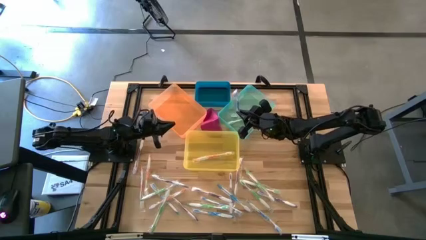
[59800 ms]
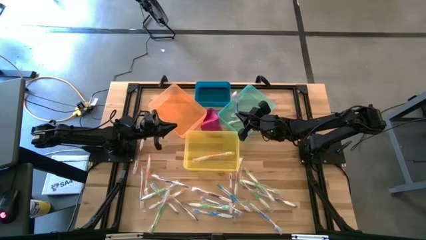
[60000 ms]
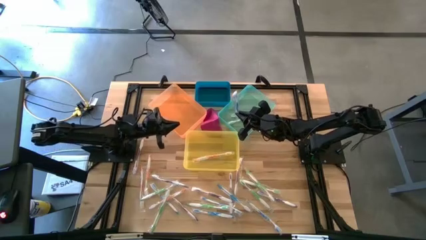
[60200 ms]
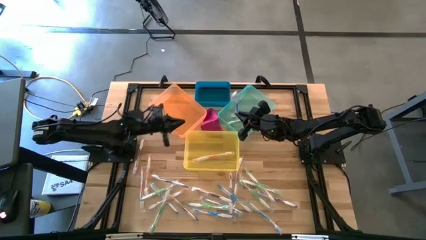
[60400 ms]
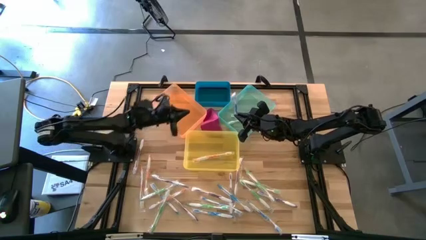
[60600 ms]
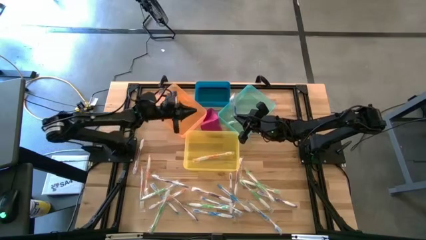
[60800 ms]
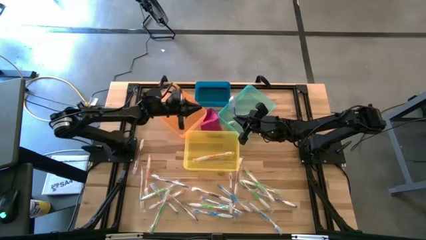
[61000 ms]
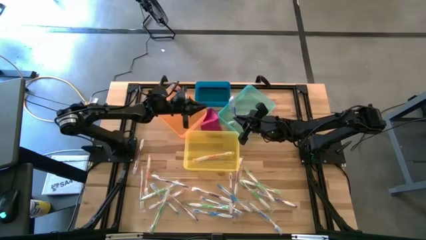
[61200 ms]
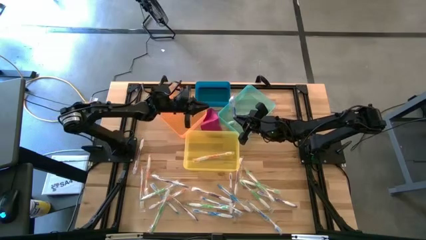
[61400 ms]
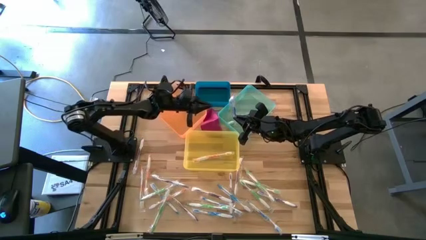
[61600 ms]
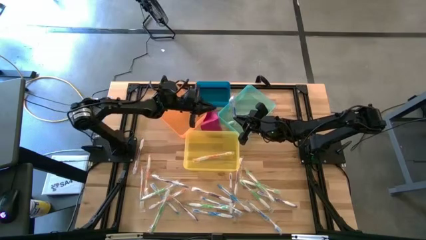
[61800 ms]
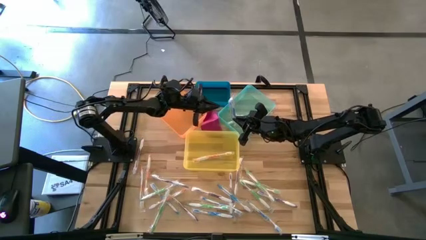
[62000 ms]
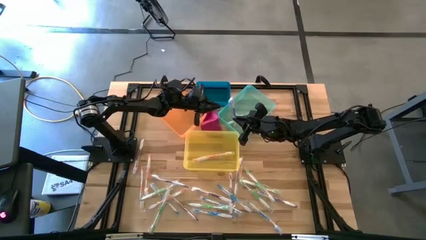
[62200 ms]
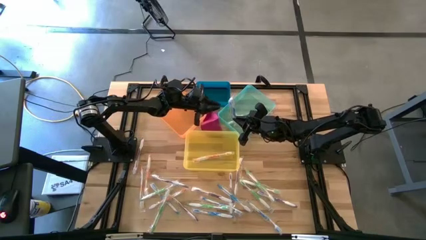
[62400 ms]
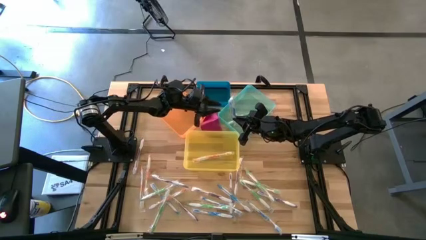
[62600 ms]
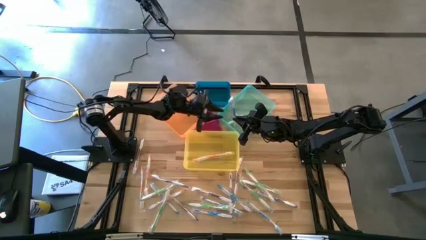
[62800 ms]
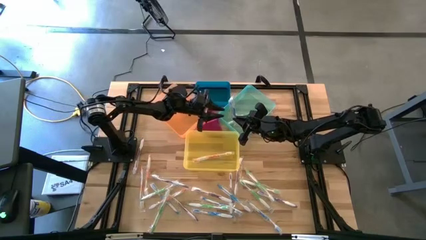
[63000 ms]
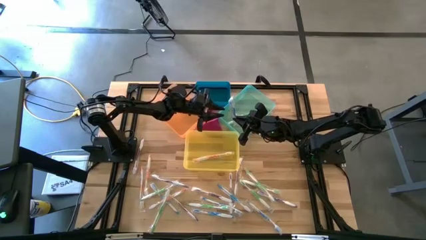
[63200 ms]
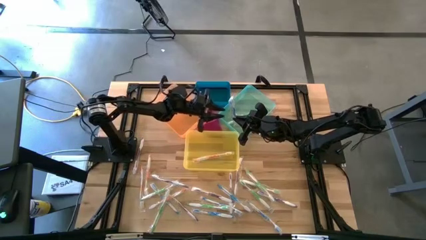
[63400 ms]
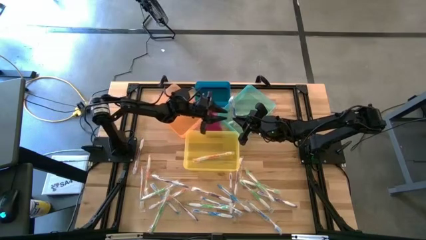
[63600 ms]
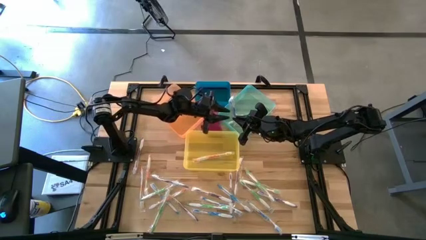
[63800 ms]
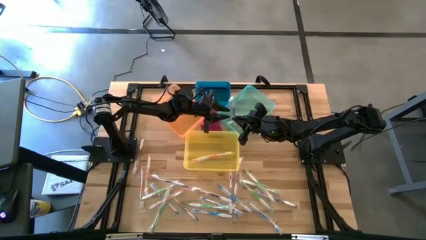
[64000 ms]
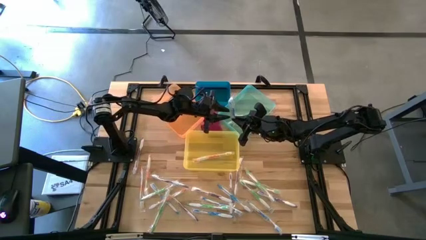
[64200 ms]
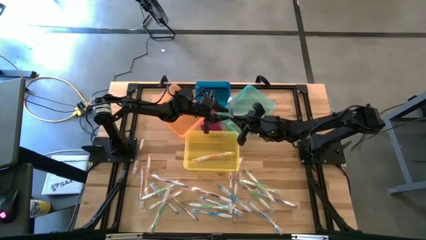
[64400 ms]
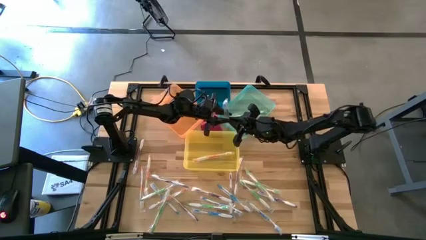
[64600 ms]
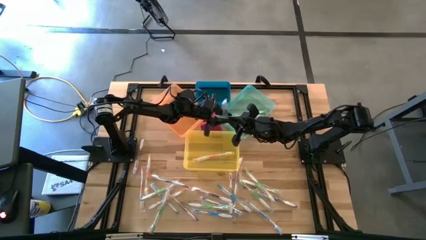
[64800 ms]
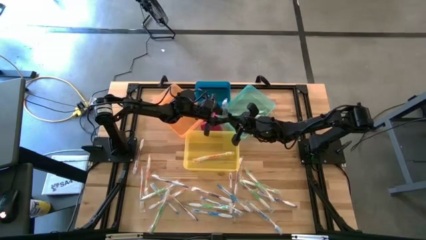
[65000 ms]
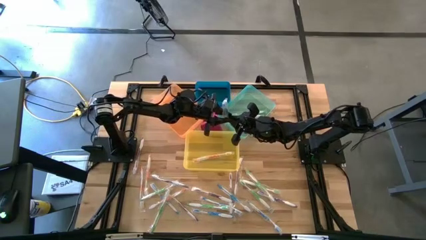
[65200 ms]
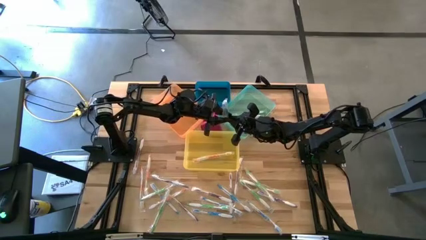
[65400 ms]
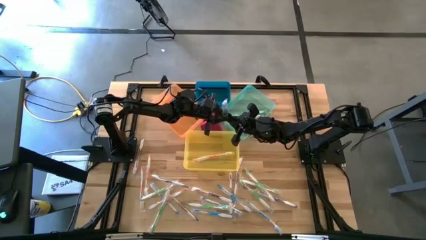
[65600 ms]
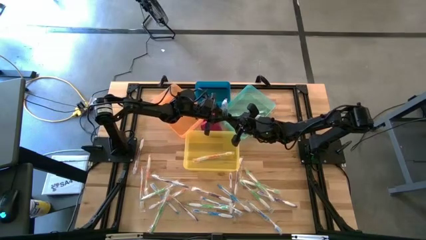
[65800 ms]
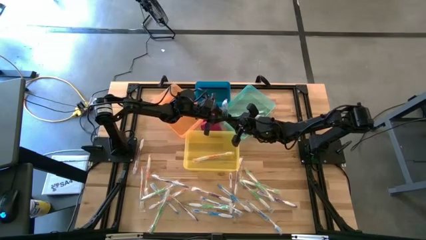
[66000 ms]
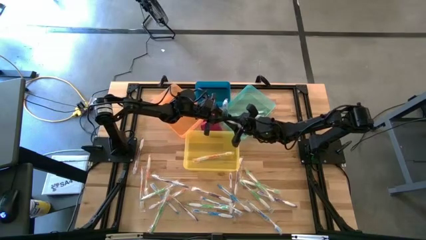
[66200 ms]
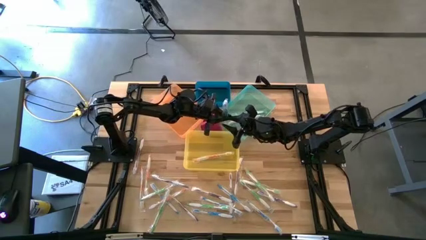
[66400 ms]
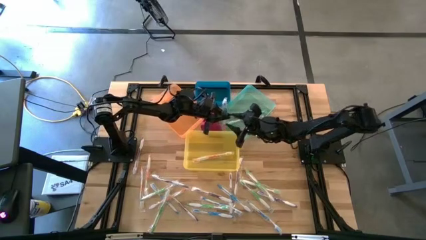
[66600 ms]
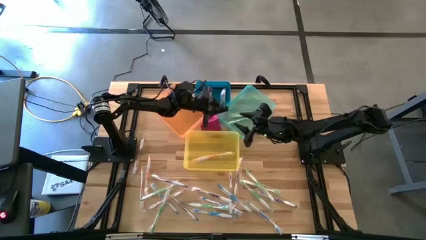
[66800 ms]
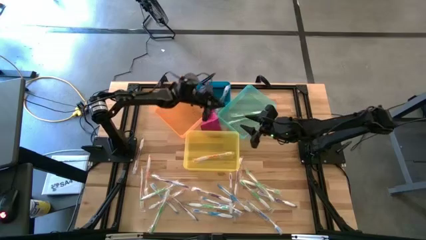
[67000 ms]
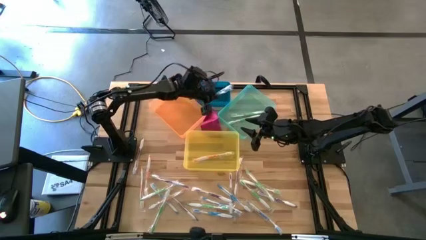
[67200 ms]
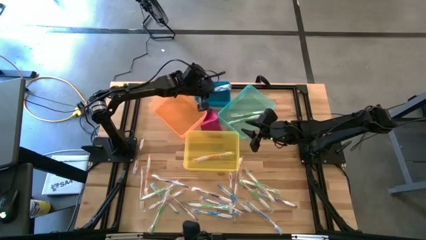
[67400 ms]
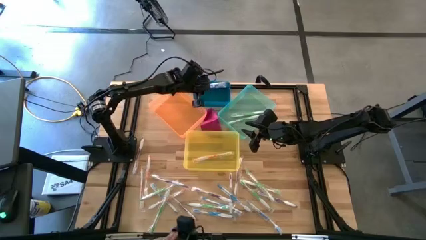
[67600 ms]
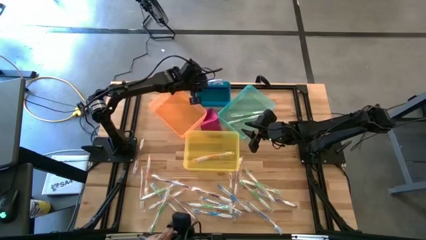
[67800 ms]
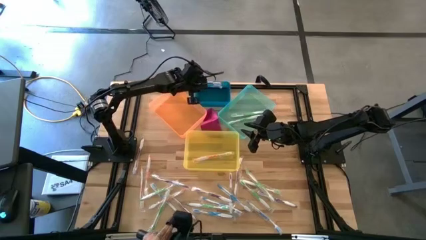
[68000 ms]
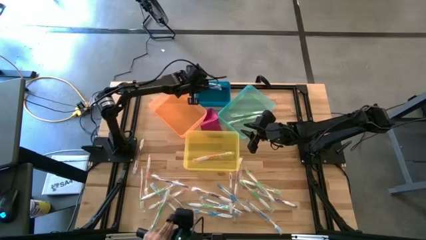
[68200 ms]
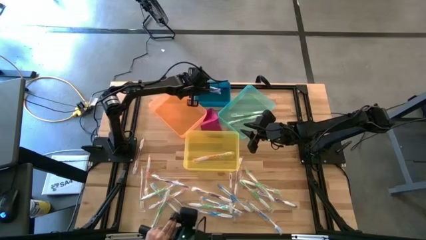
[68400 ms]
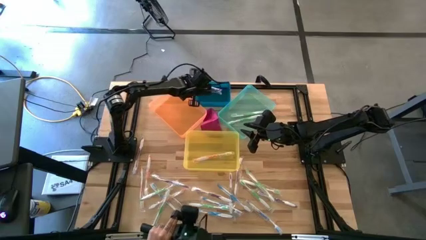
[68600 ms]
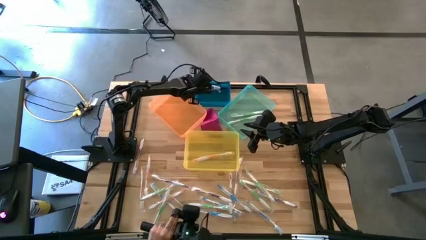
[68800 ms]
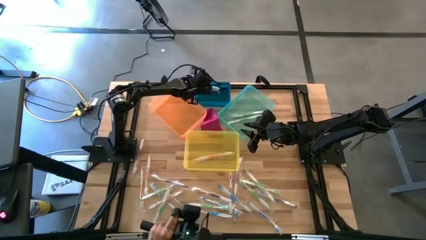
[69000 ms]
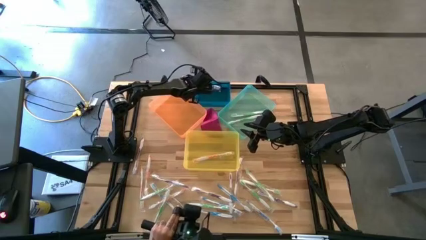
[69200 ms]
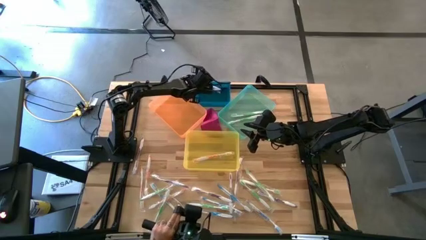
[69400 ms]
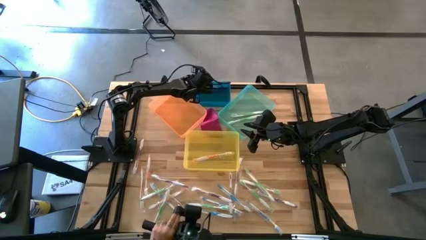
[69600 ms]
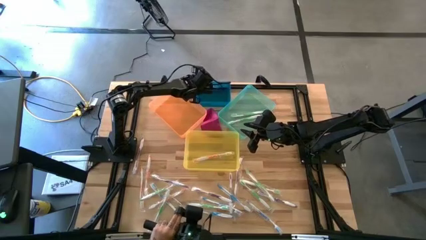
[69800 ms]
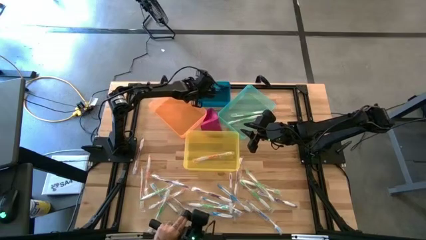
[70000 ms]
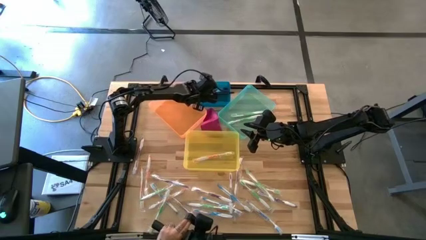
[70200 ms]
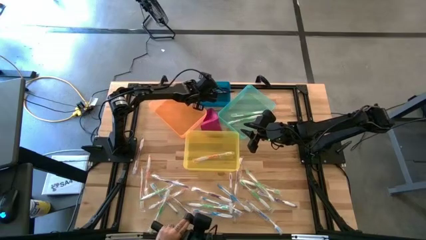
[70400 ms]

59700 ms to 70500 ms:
Task: Pick & Place Toothbrushes
Put the blue toothbrush into the blue bin

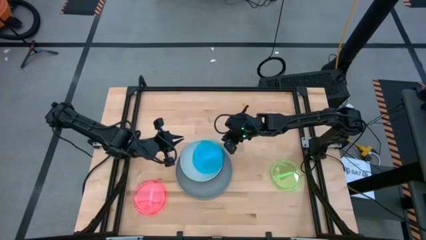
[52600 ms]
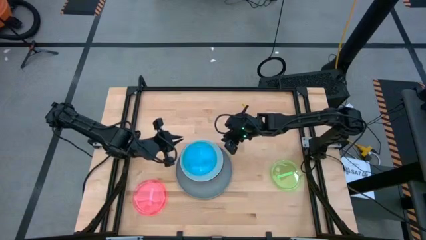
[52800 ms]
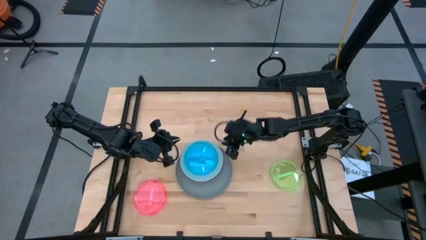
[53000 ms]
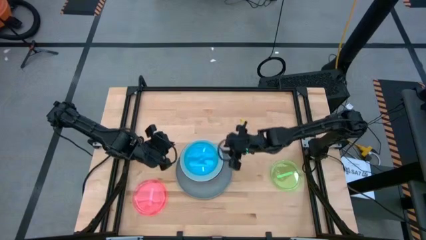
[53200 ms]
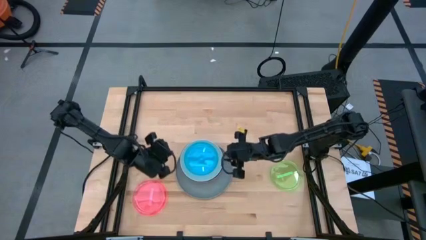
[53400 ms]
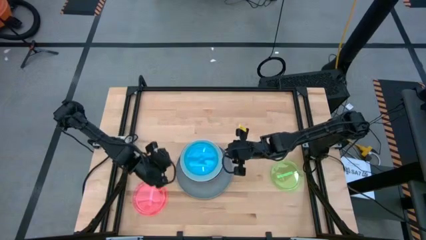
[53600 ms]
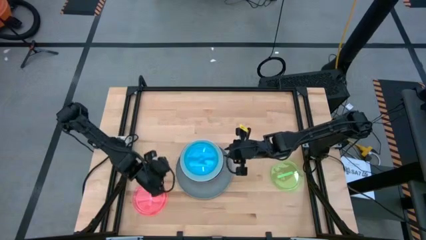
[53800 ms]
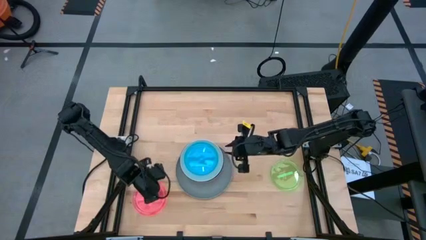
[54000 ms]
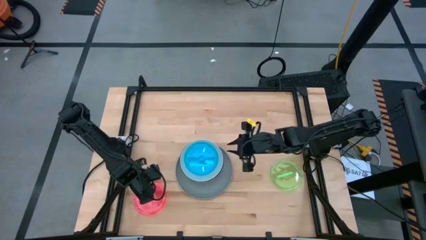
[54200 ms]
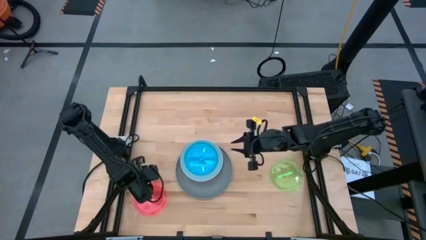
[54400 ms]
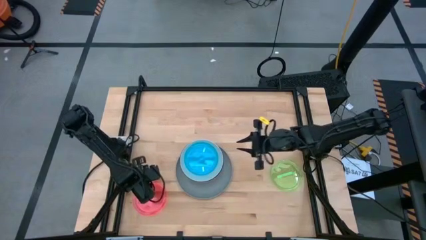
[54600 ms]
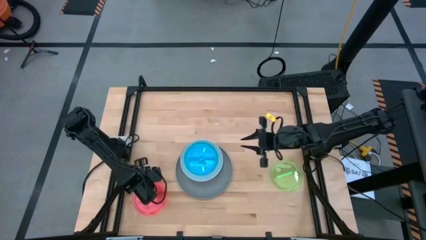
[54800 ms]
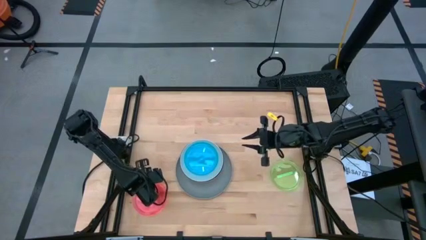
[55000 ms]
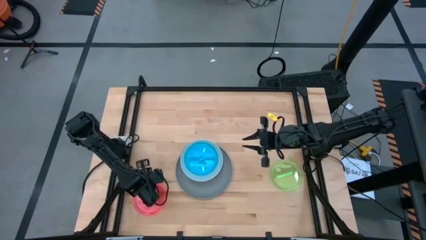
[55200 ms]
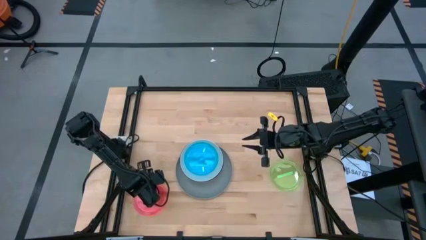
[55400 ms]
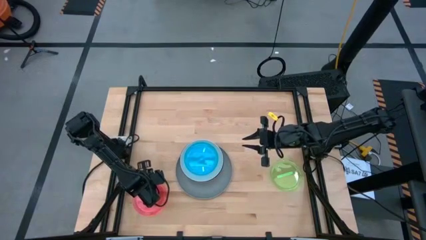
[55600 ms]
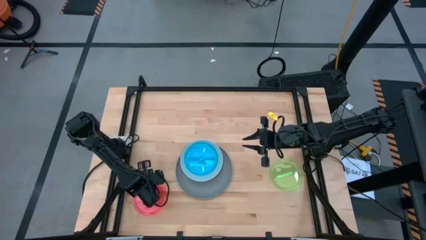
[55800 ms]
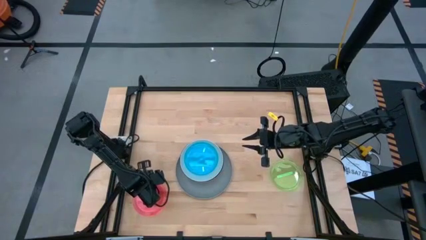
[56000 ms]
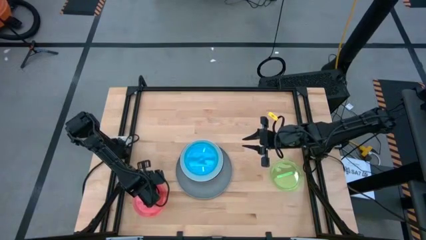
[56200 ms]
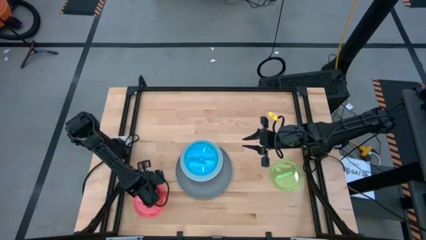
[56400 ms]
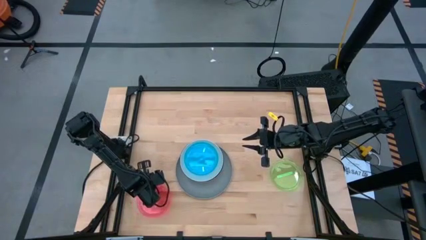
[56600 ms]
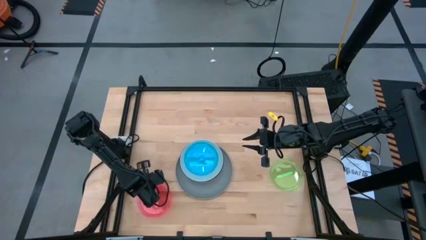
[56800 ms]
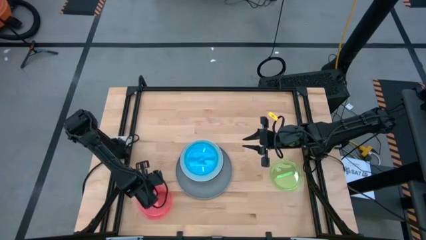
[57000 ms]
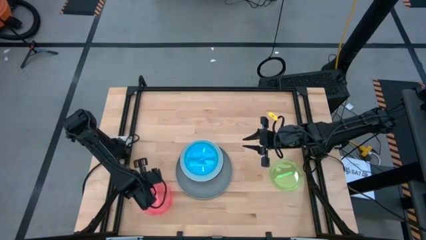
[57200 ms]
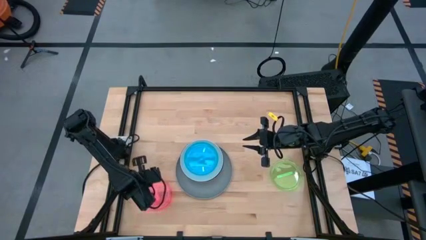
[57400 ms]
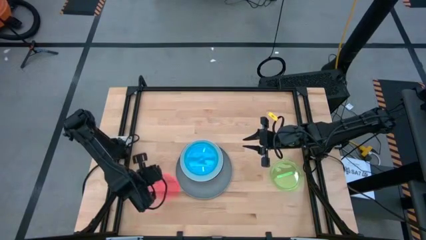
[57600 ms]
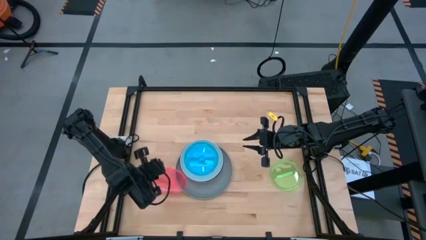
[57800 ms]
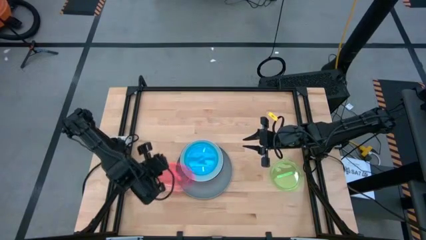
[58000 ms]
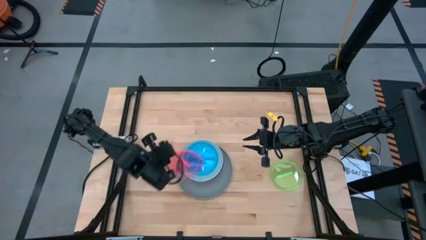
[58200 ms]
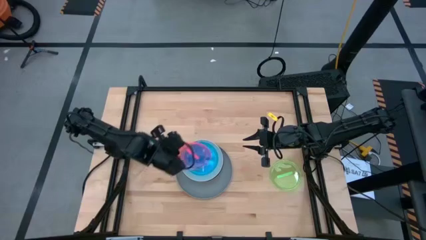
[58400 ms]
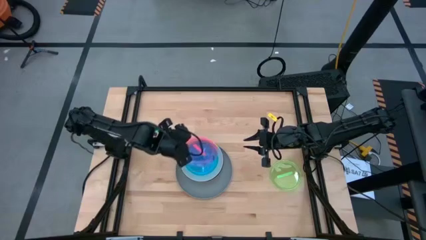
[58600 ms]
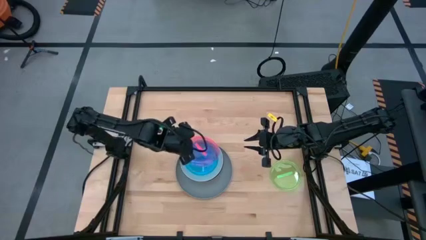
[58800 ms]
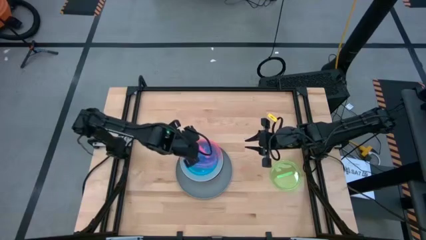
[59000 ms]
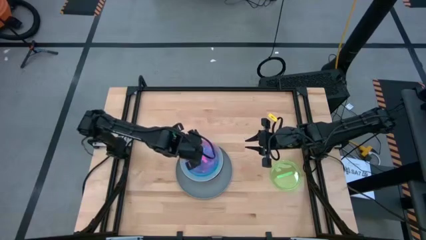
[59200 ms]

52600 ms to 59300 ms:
Task: Stack plastic plates
Stack the pink plate on top of the blue plate
